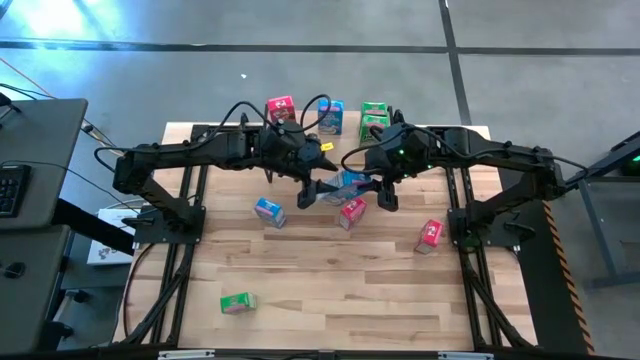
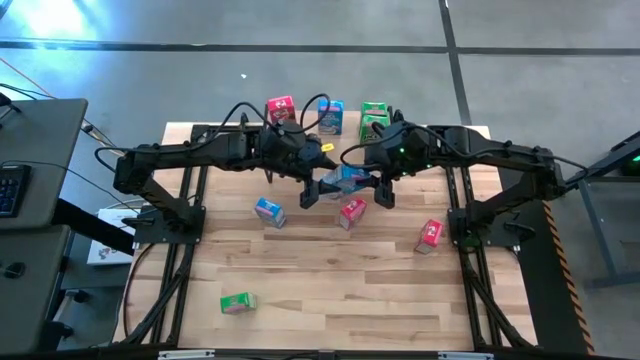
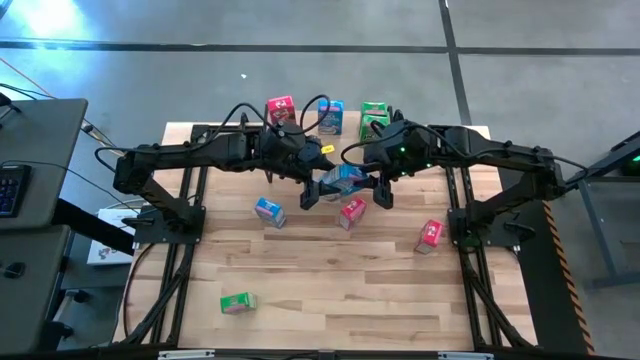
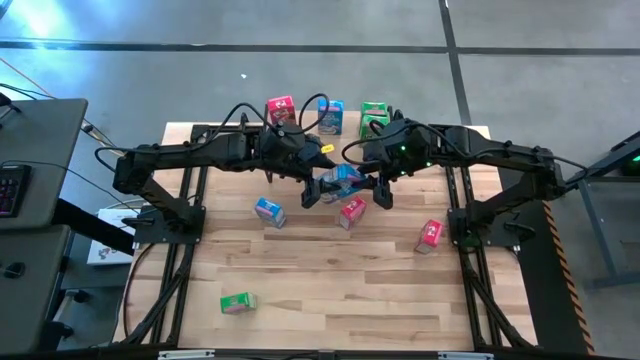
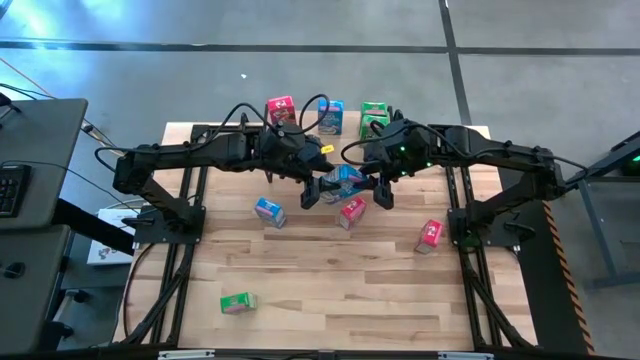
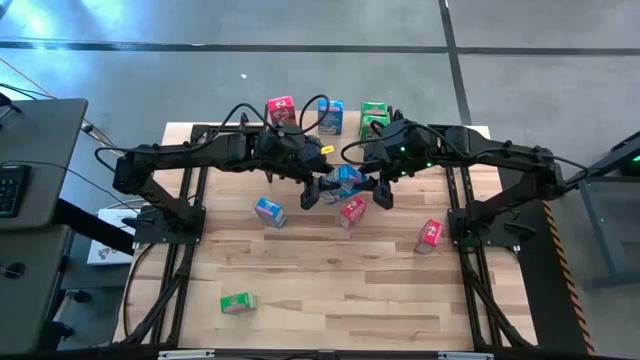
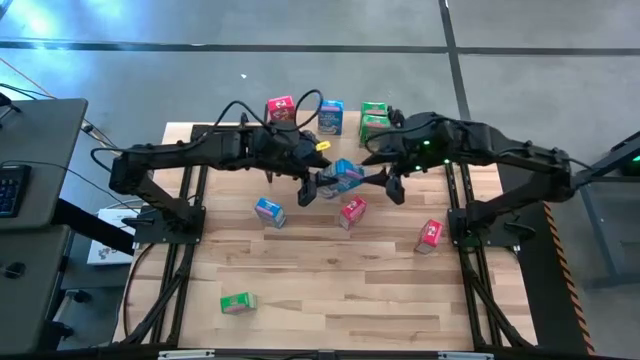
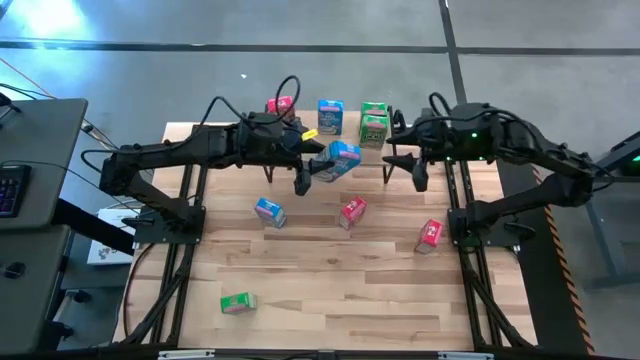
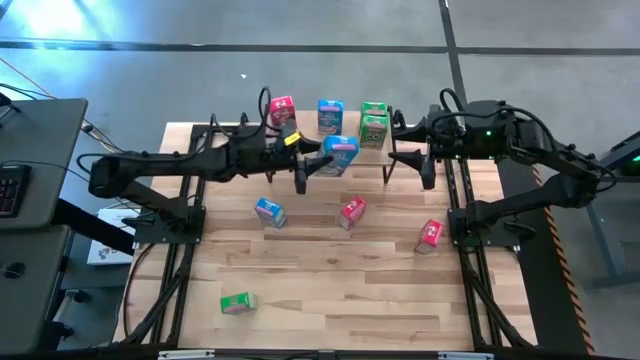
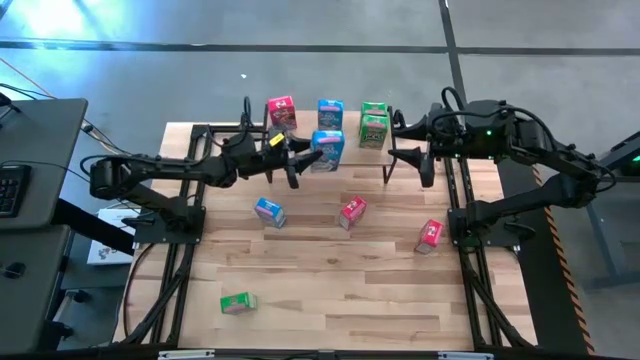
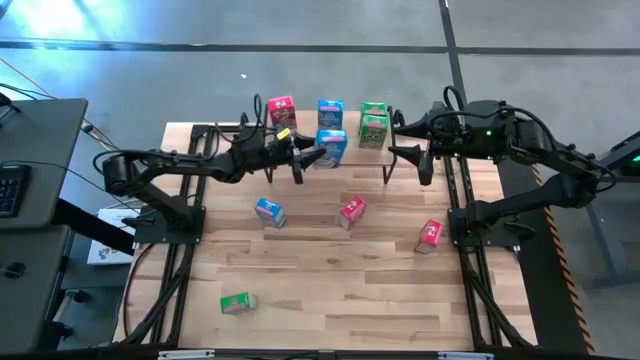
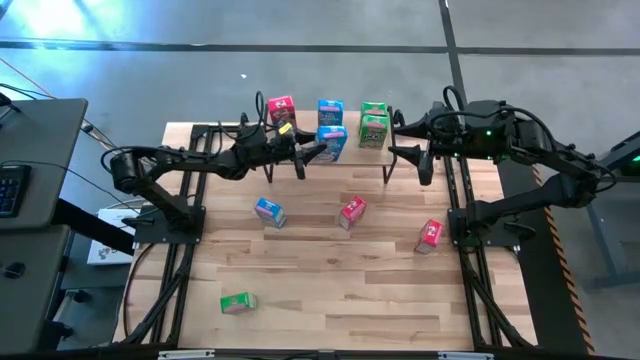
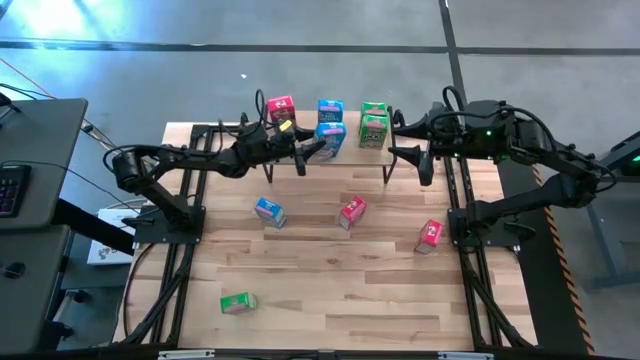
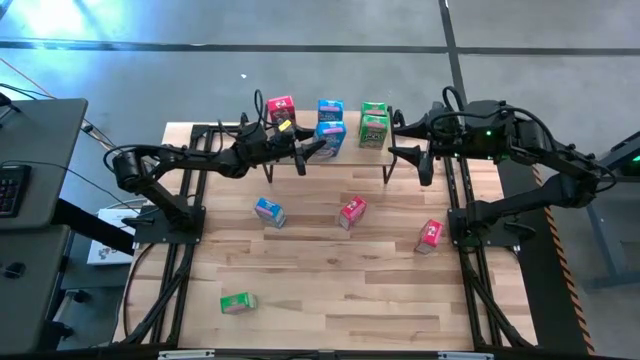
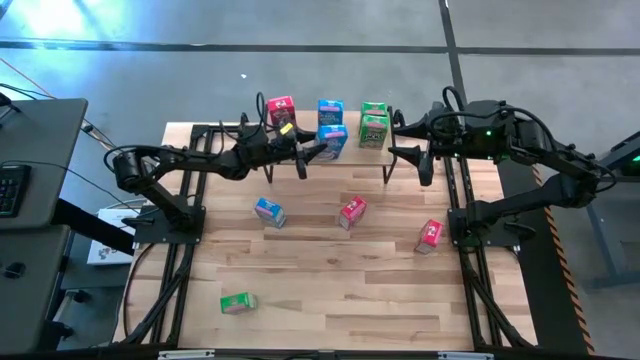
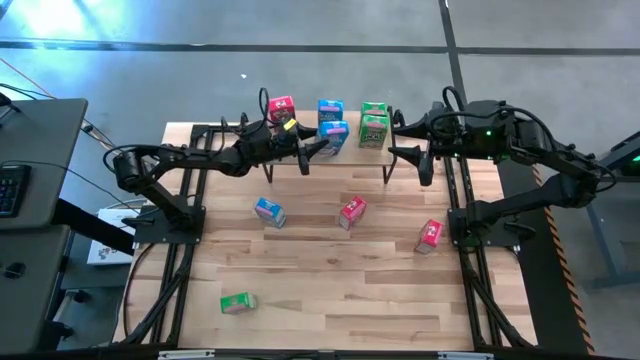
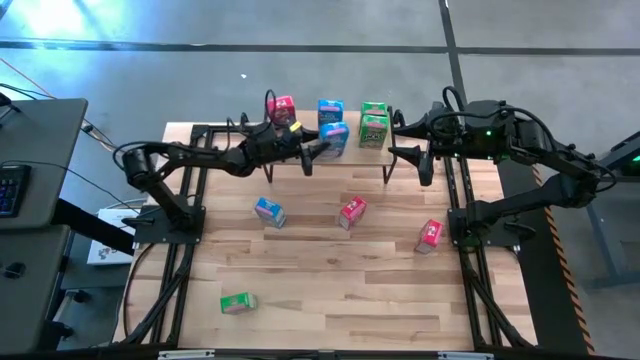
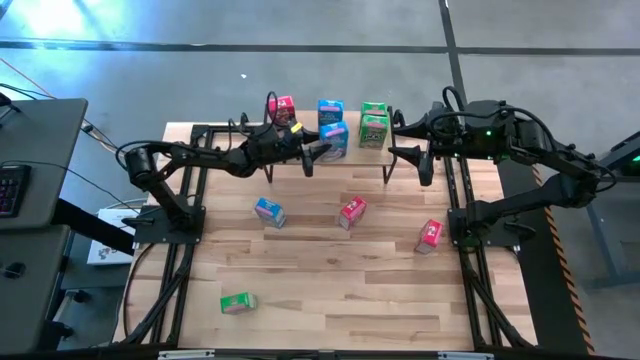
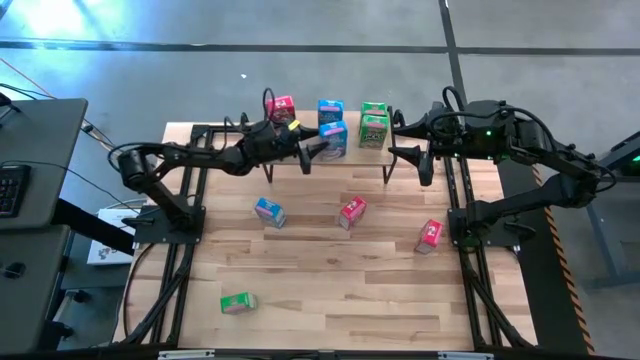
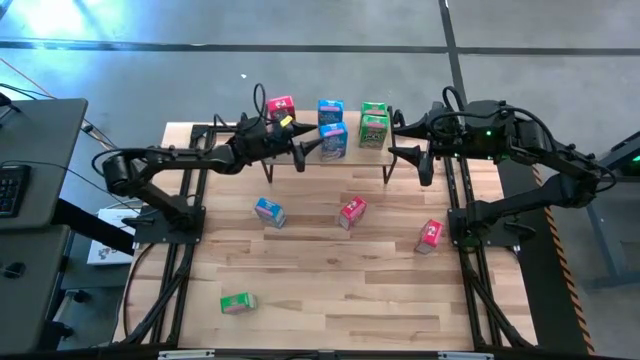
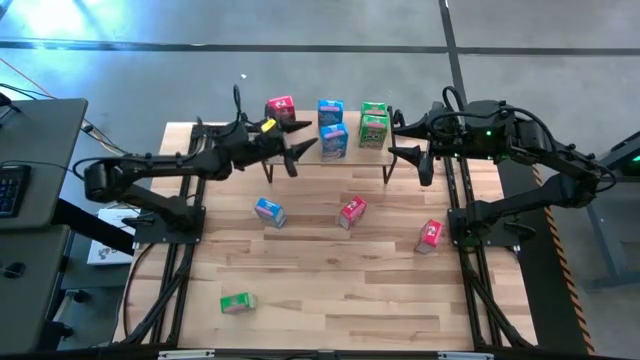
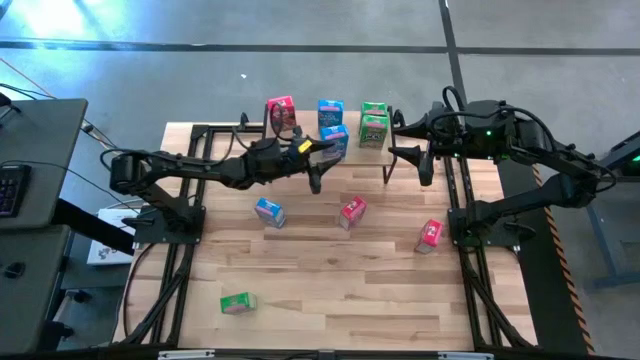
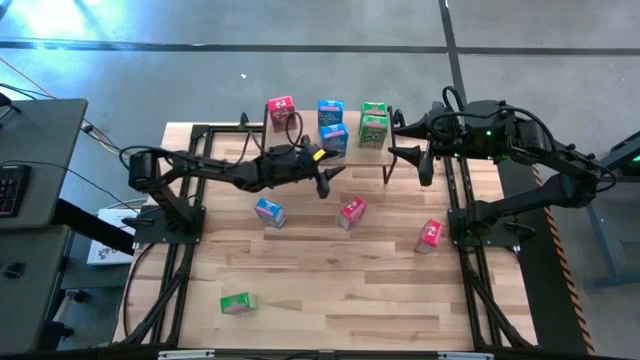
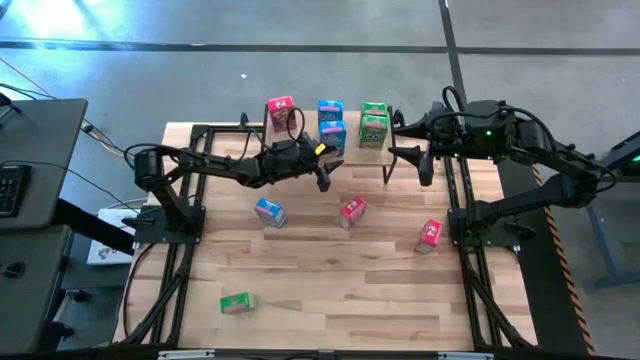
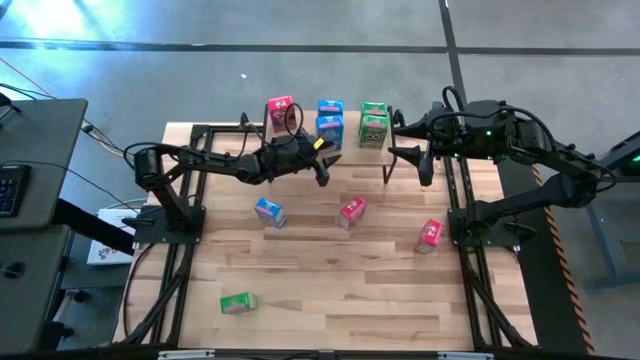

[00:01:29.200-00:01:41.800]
Task: Stack cereal on shelf
Put the right blue cereal box on the shelf aligned with the other blue cereal box

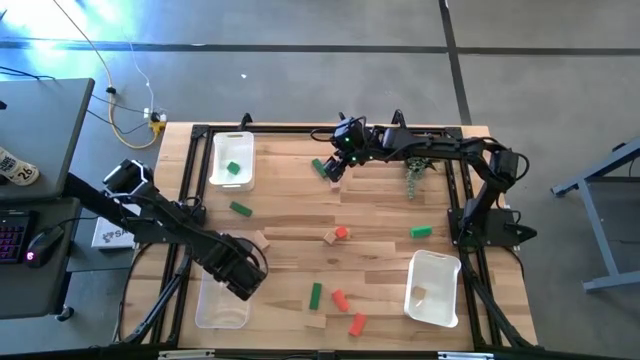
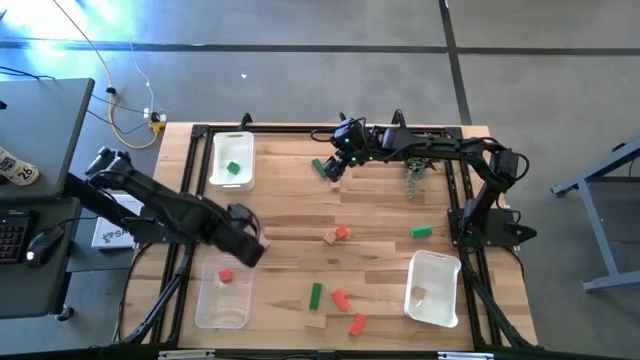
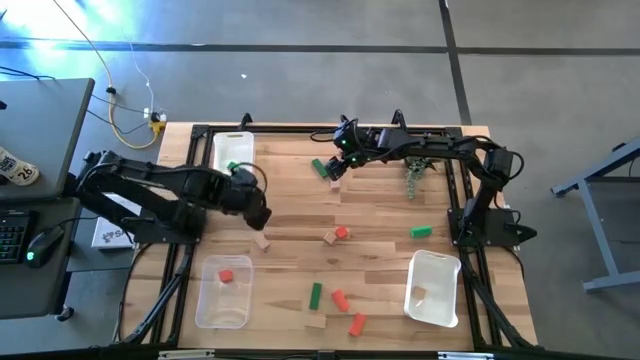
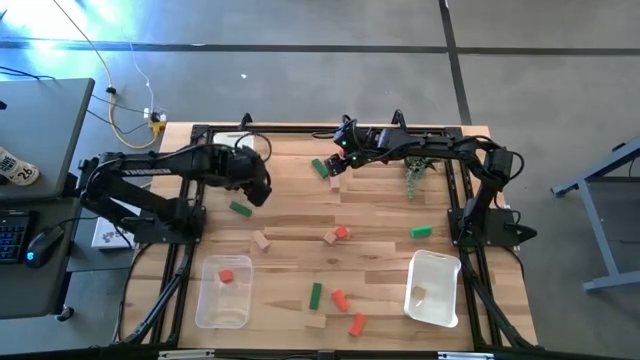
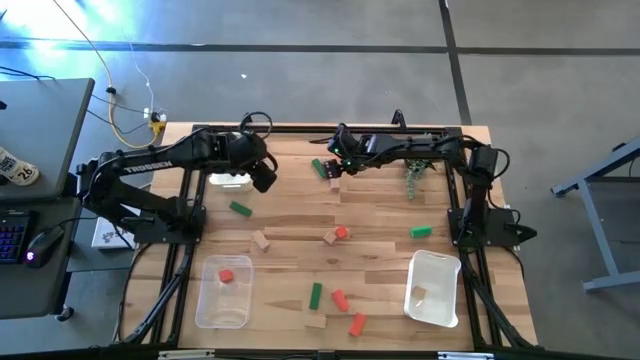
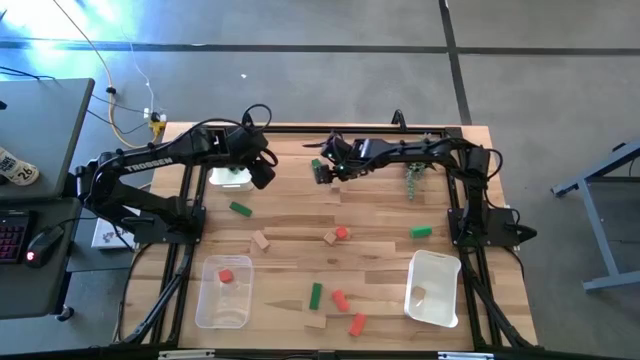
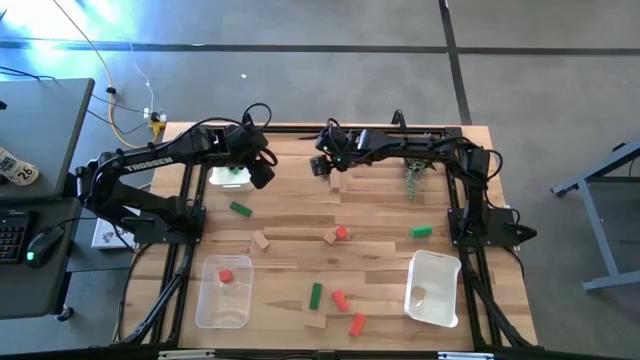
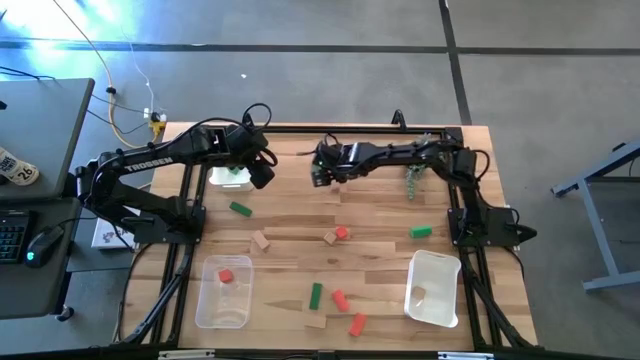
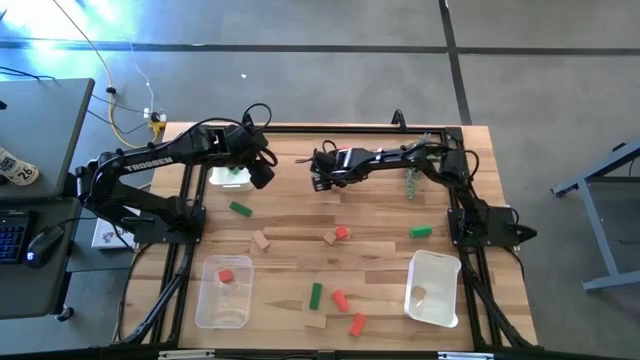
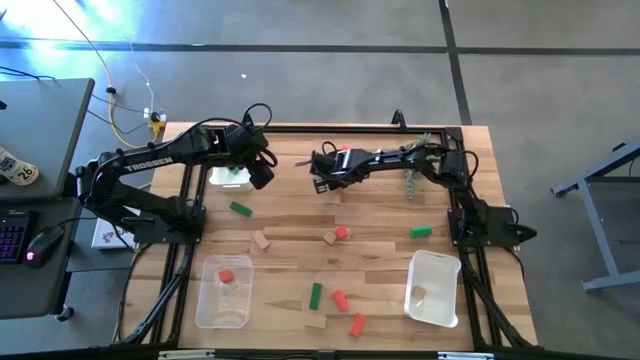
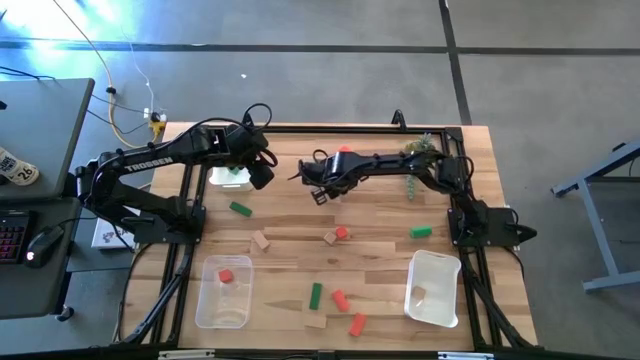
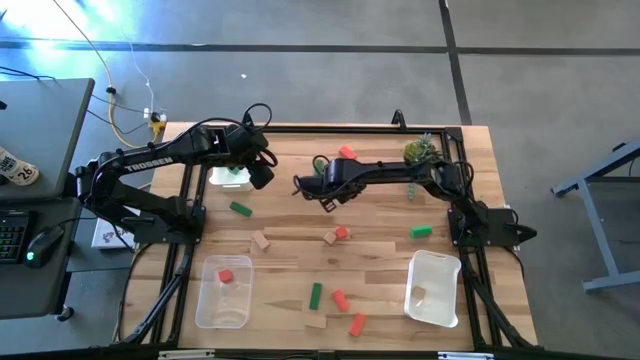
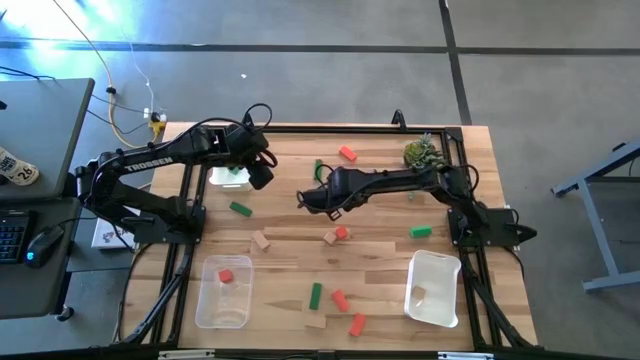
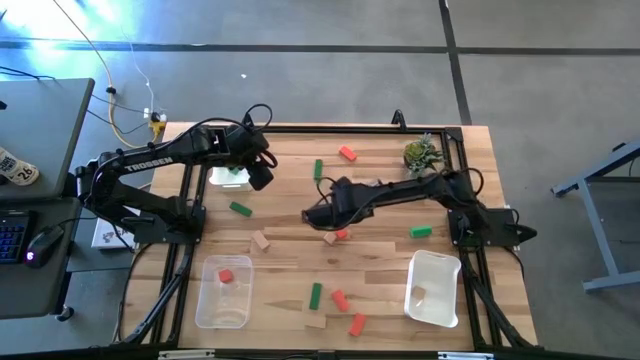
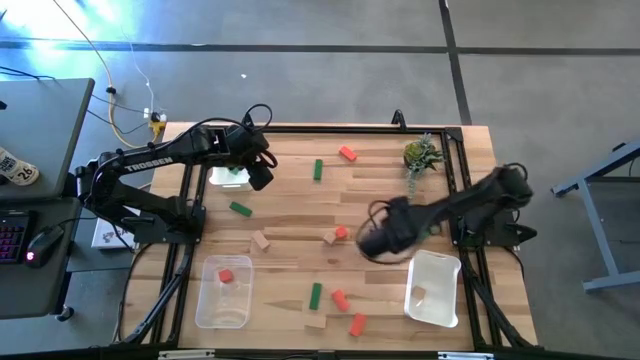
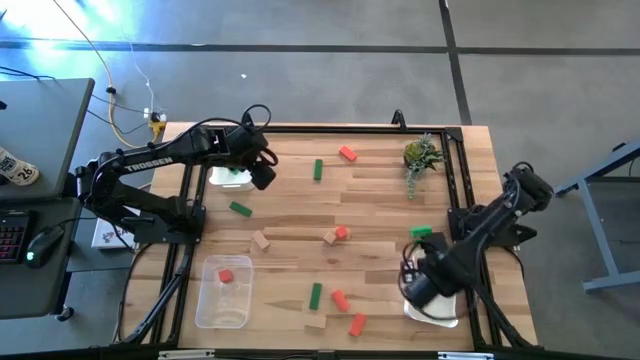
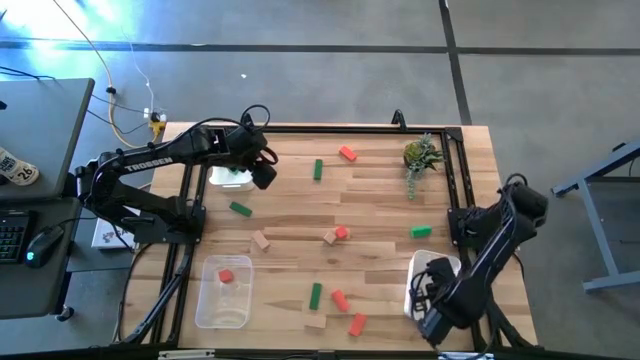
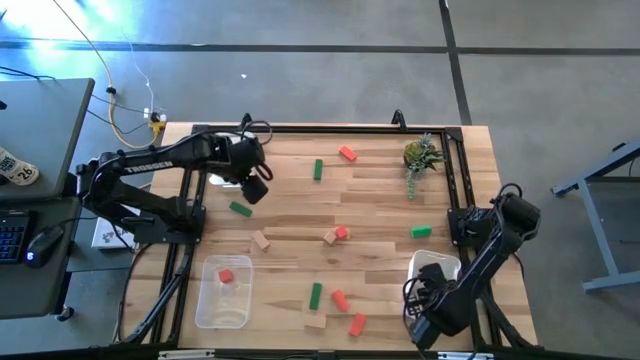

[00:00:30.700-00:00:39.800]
Task: Sort & place blocks by color
Put the brown block into the bottom white bin
